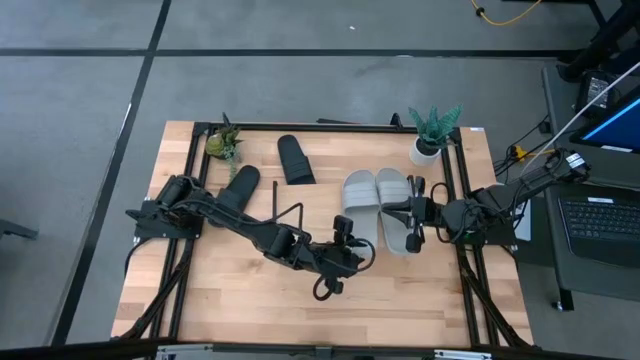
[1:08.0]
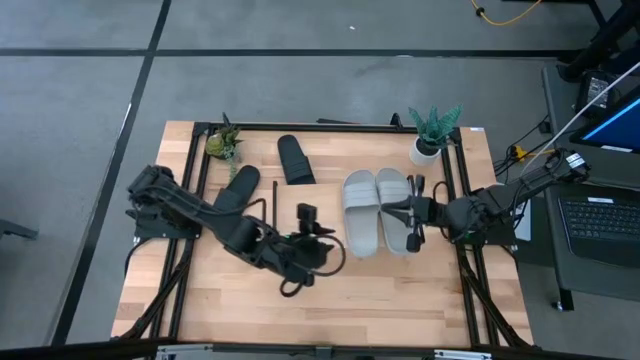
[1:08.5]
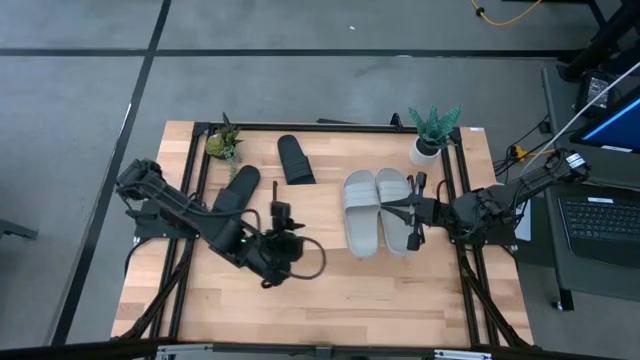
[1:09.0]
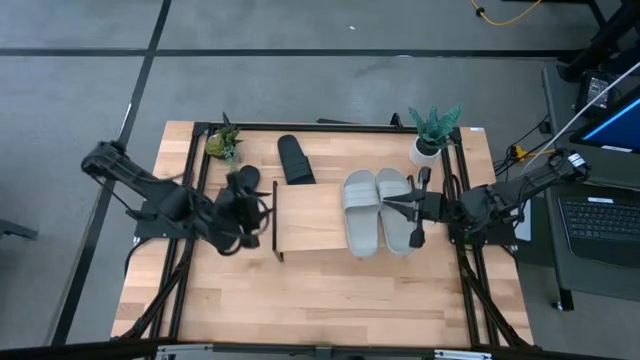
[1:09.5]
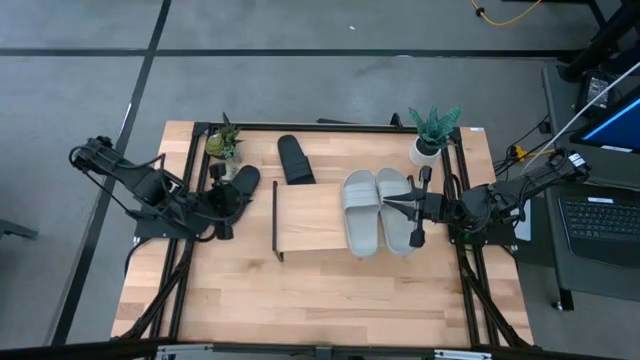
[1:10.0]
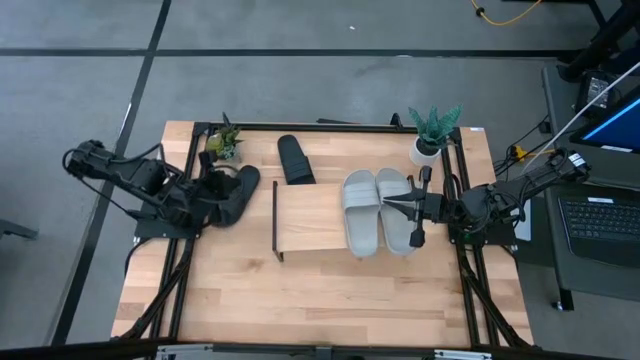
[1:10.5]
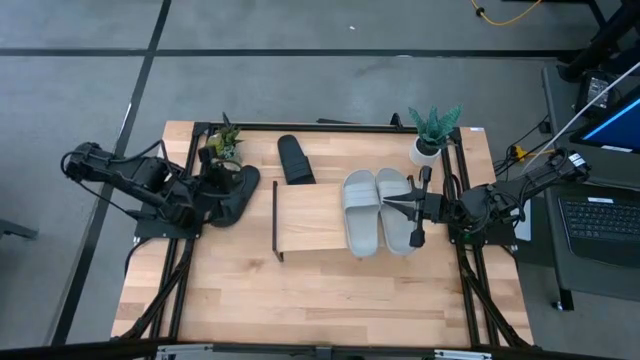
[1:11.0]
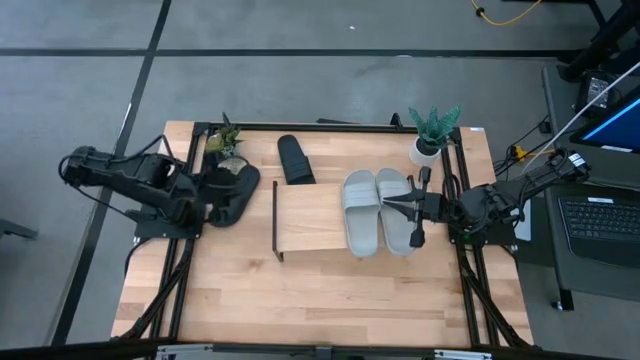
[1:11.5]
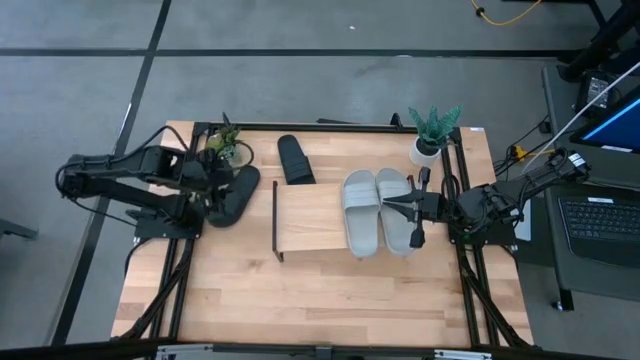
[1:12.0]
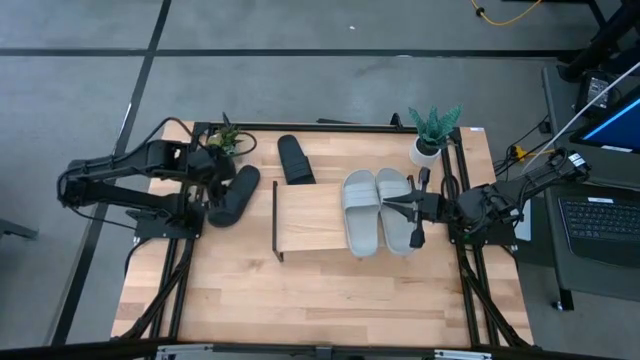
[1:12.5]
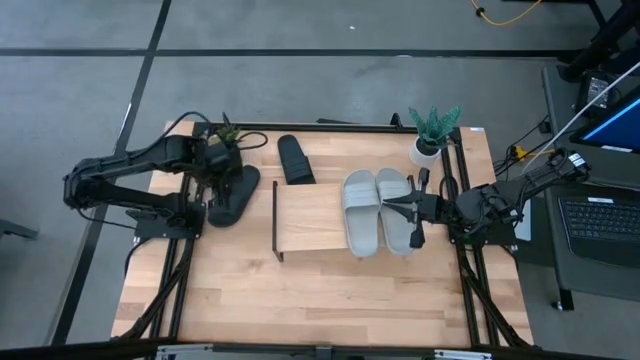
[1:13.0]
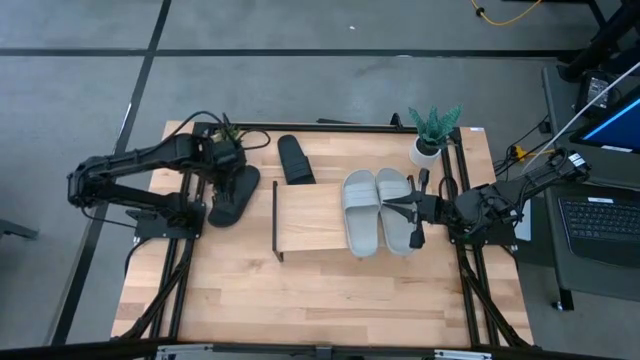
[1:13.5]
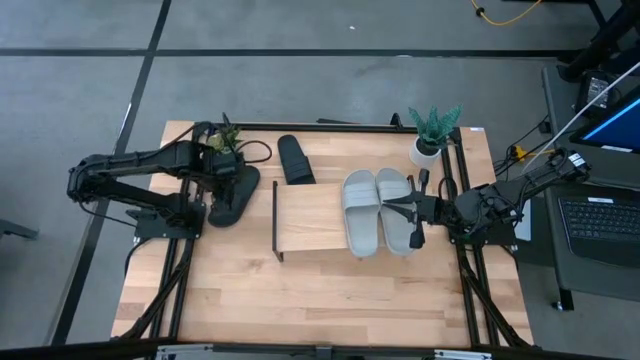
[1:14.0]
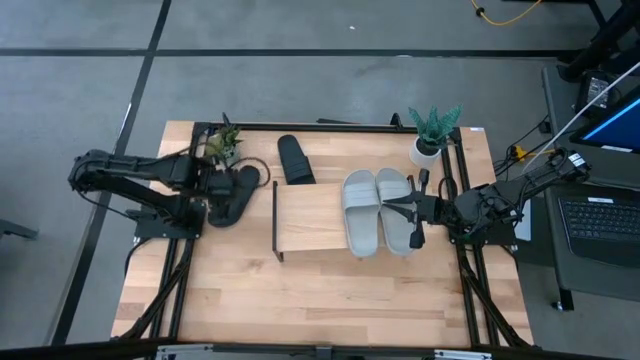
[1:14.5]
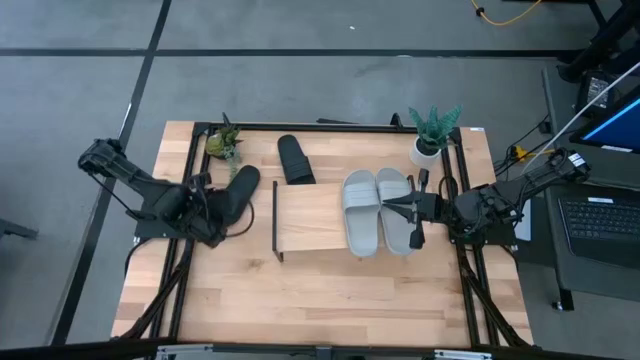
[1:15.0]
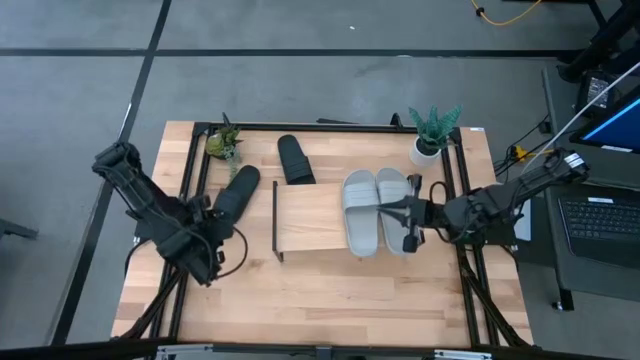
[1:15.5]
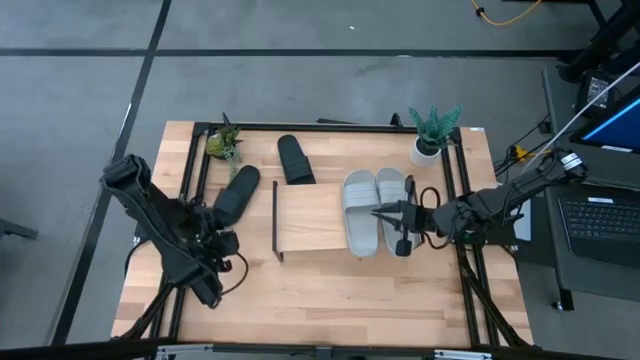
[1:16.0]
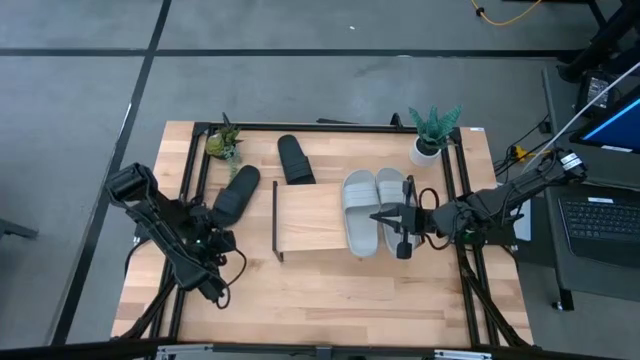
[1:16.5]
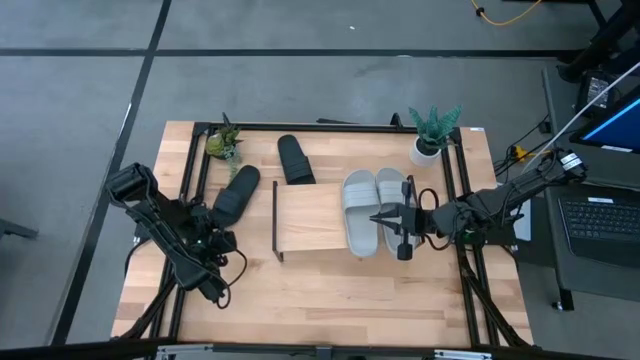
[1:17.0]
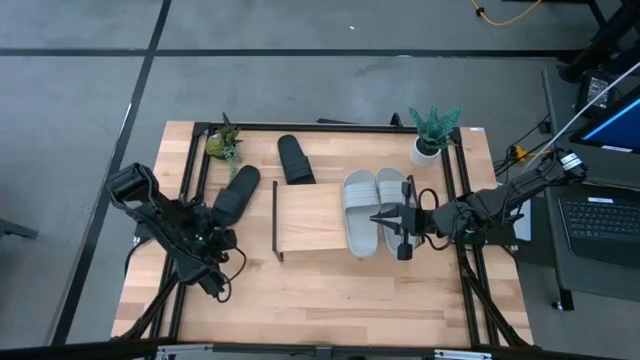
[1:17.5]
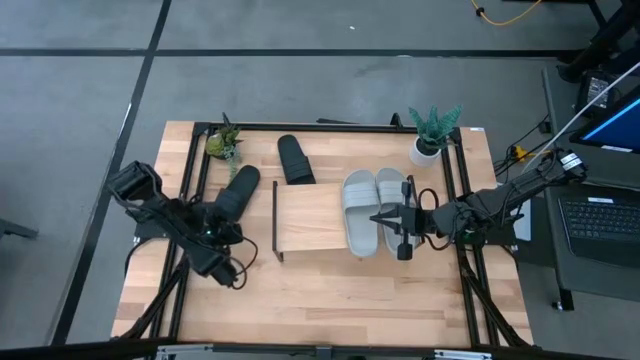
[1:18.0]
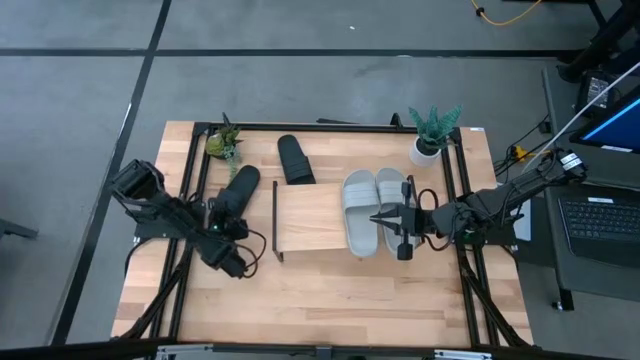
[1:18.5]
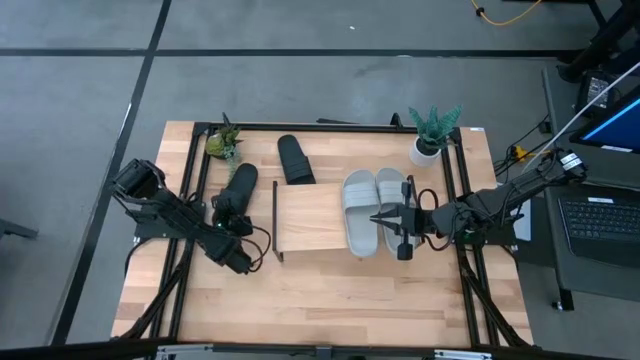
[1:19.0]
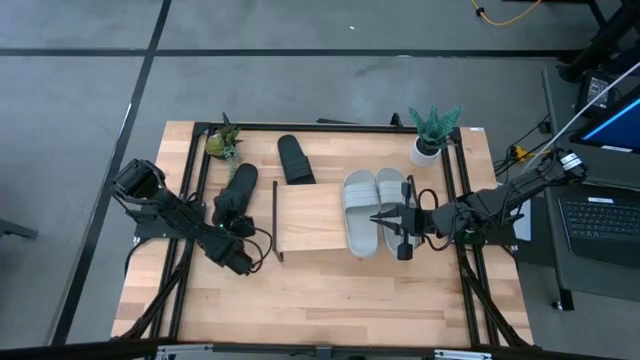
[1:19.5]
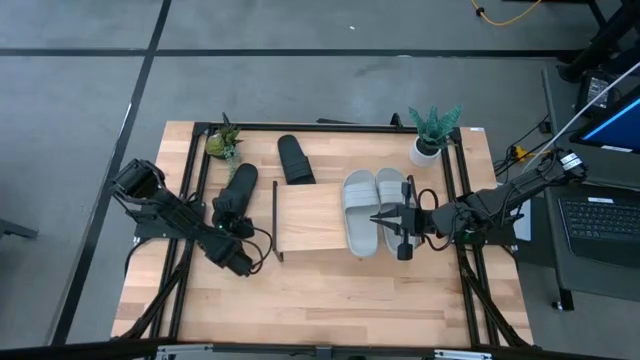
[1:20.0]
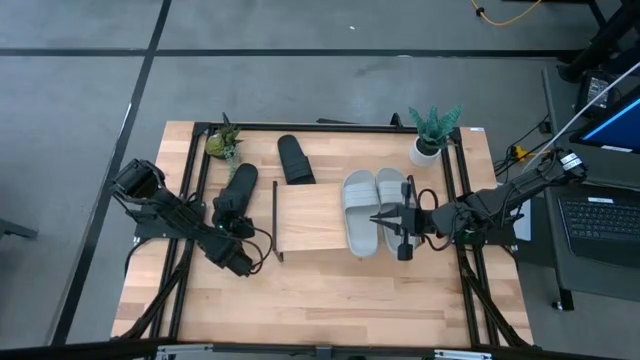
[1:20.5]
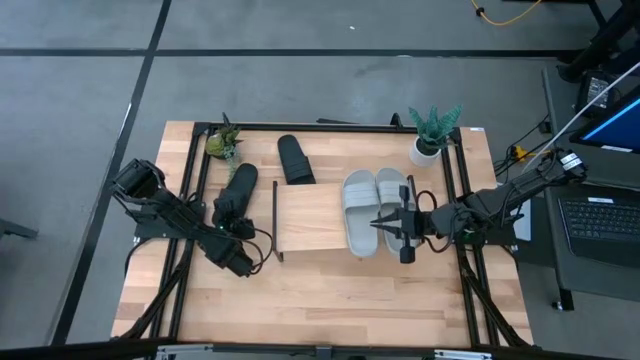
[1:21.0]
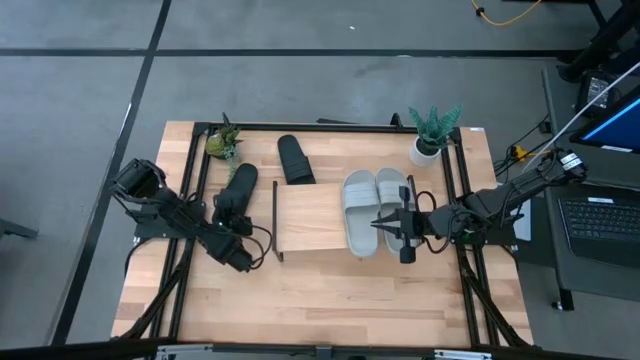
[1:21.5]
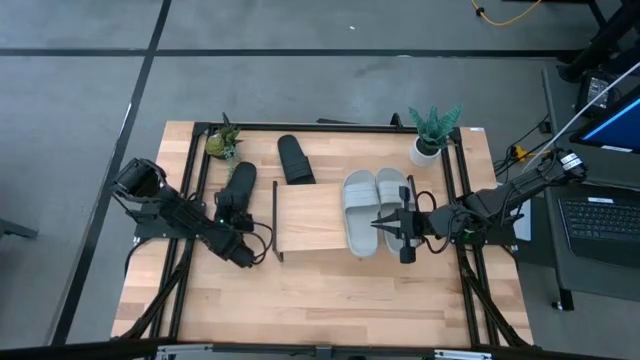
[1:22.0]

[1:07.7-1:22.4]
Task: Pick and place slides into the shelf
Put the left black slide on the shelf

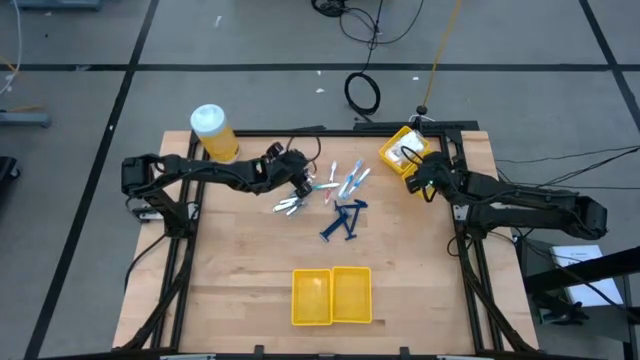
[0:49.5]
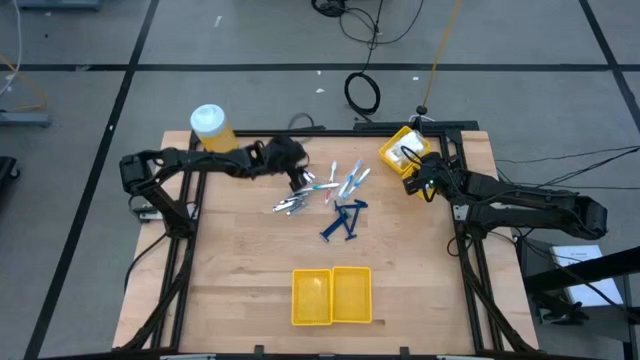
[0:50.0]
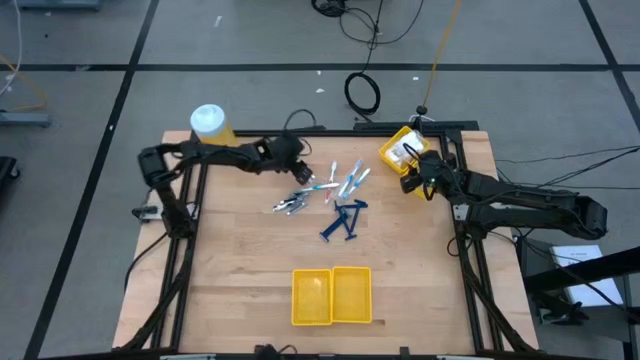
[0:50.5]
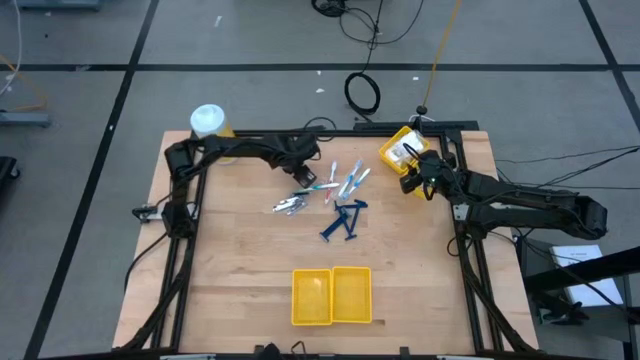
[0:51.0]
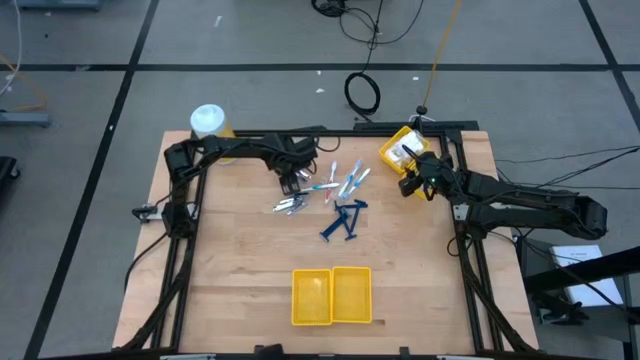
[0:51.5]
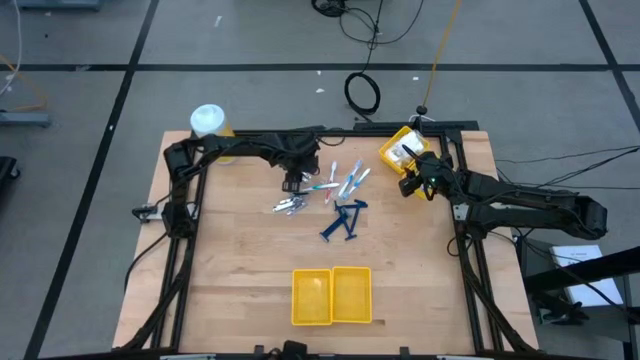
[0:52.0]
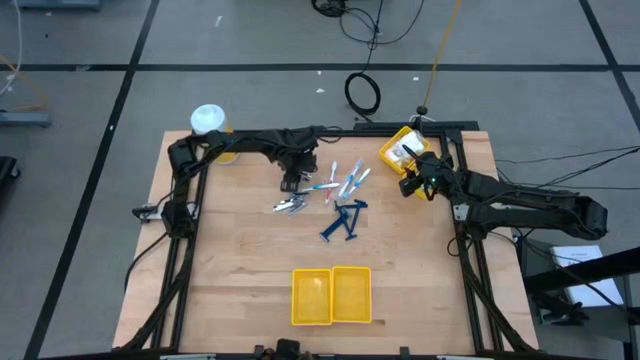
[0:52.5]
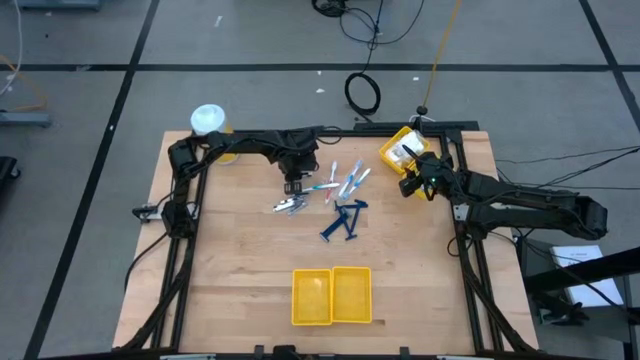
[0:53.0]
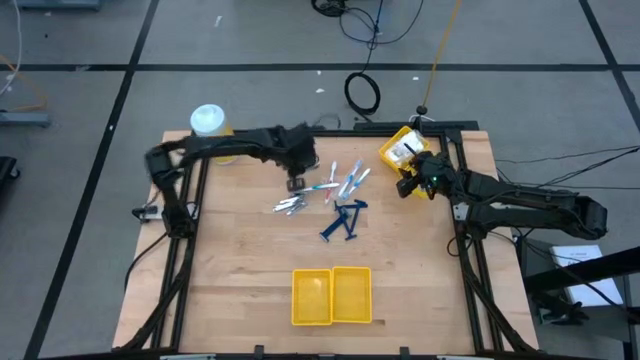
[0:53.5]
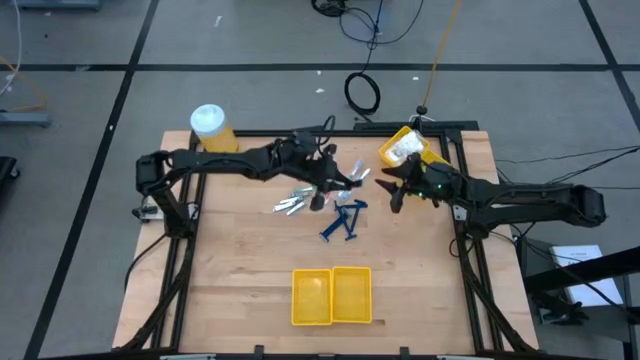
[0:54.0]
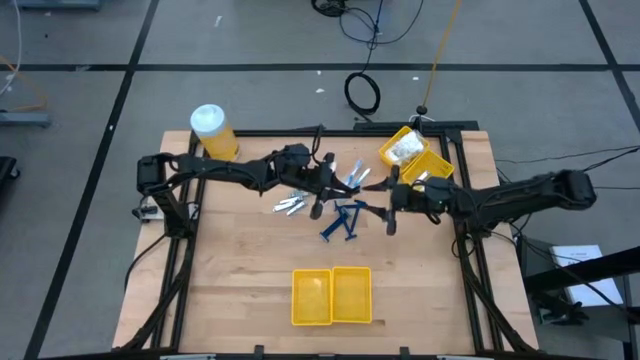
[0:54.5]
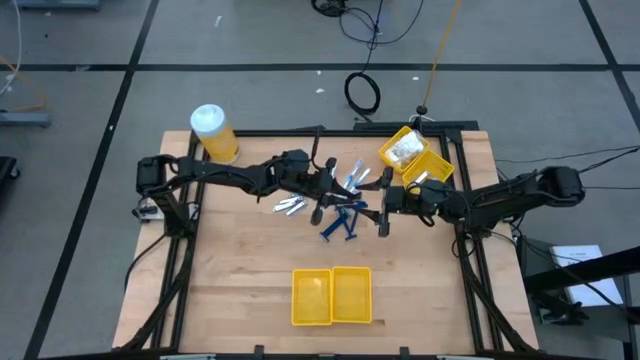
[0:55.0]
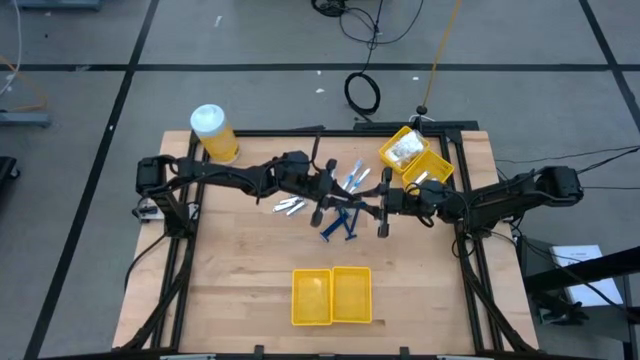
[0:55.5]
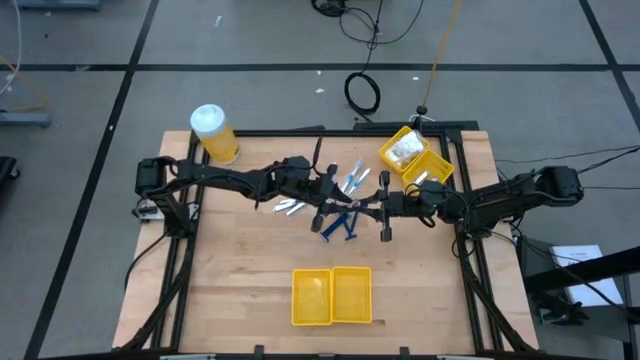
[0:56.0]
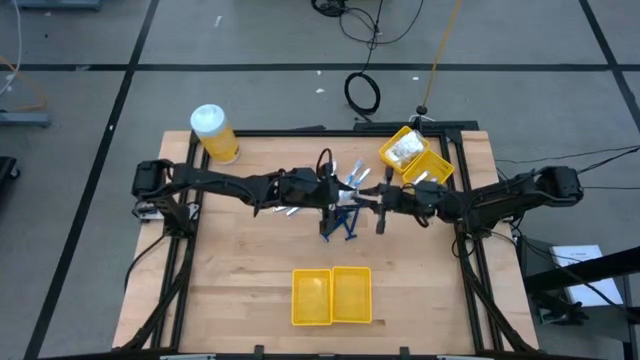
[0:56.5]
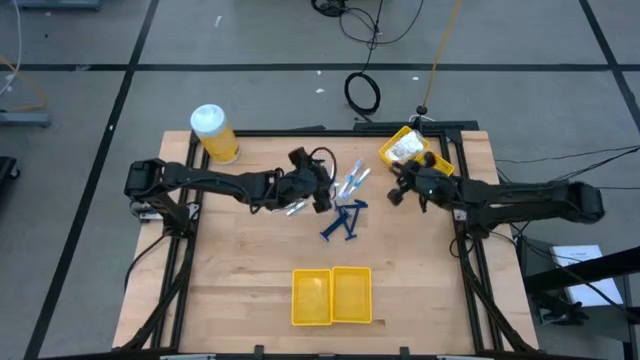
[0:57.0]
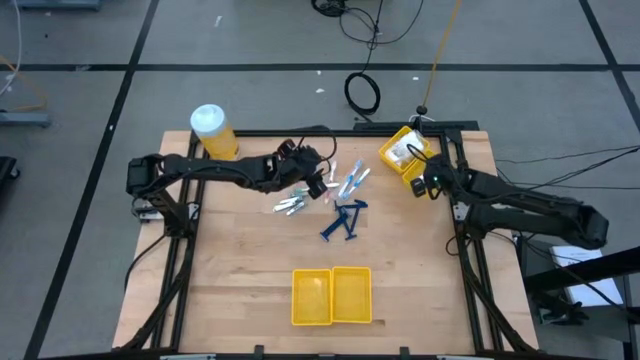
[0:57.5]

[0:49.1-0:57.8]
Task: Pick & Place Travel size toiletries
Put the silver nail cutter into the top right yellow bin
